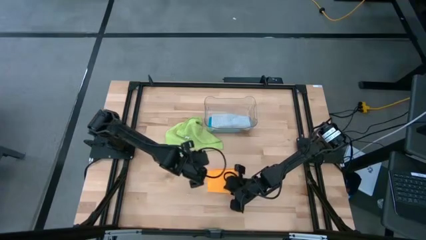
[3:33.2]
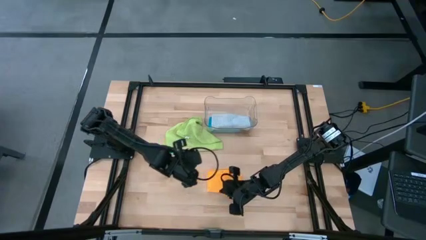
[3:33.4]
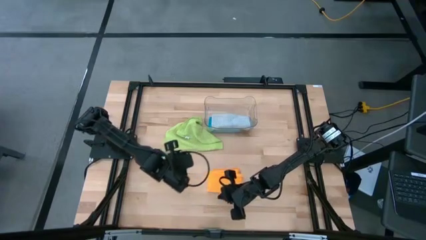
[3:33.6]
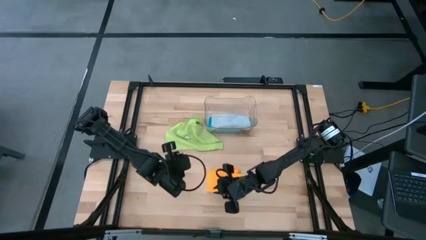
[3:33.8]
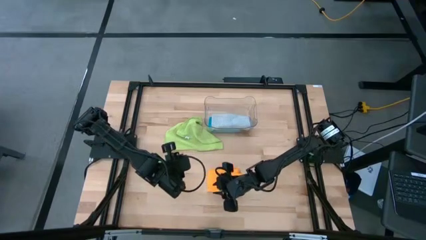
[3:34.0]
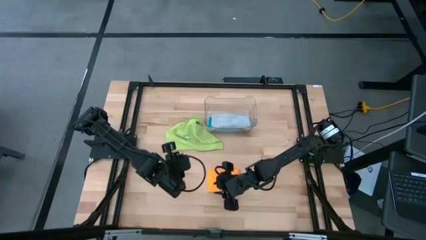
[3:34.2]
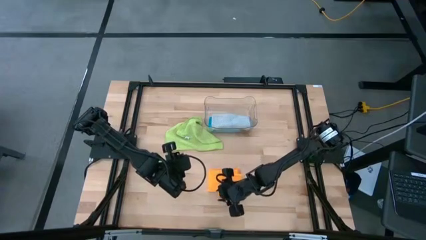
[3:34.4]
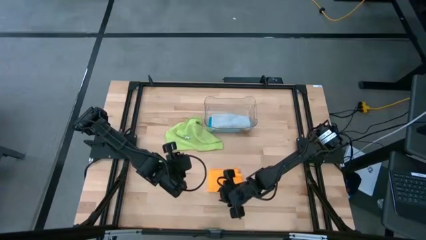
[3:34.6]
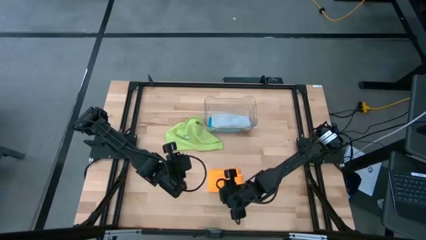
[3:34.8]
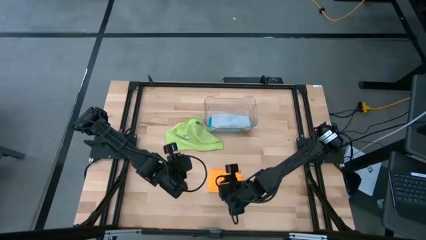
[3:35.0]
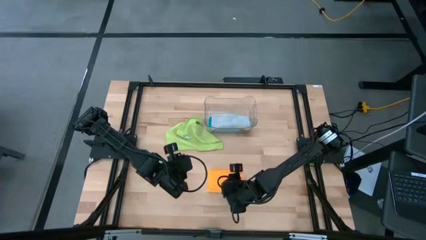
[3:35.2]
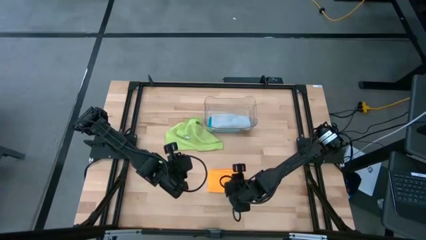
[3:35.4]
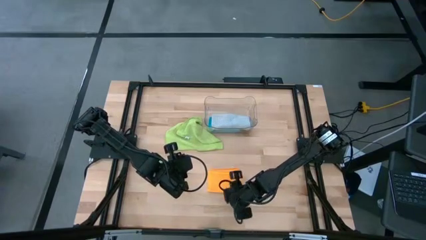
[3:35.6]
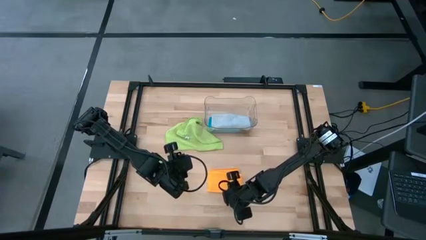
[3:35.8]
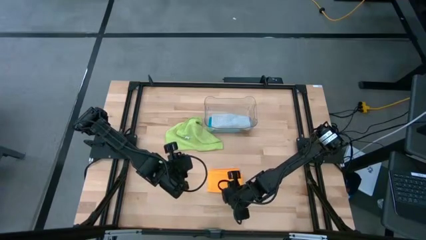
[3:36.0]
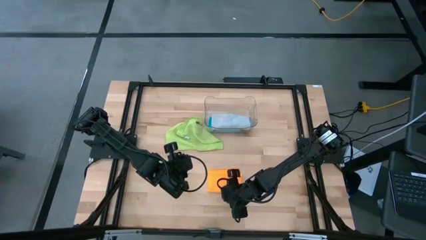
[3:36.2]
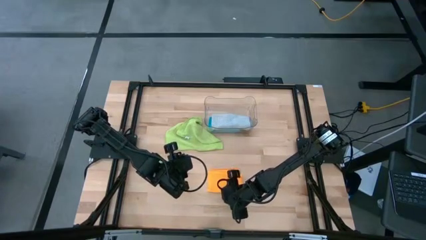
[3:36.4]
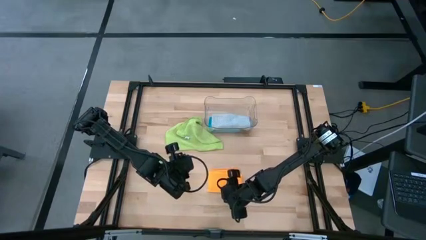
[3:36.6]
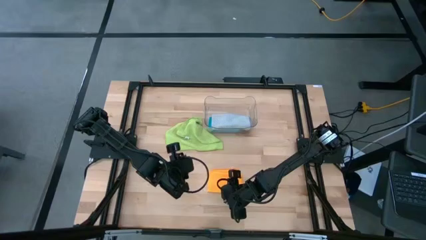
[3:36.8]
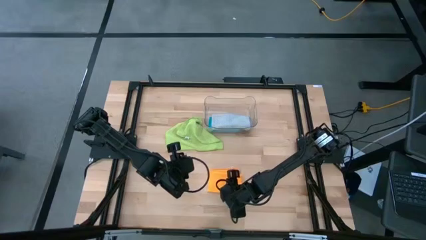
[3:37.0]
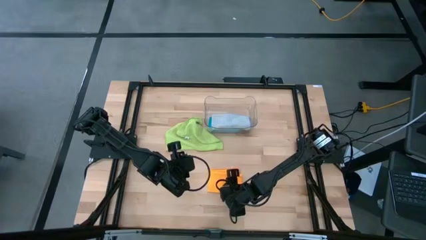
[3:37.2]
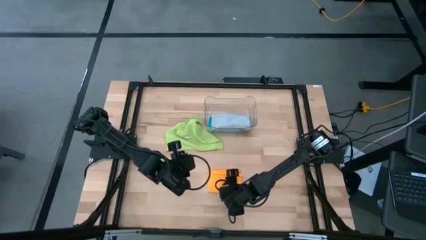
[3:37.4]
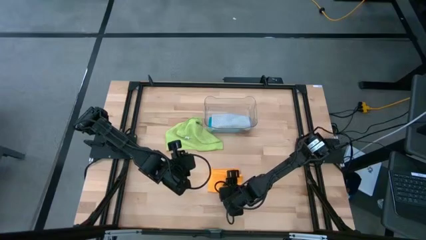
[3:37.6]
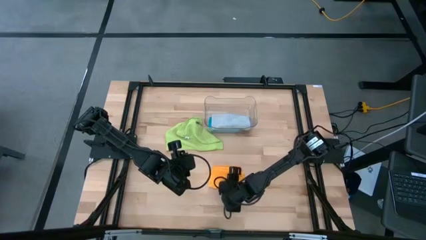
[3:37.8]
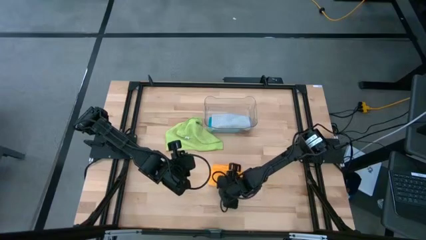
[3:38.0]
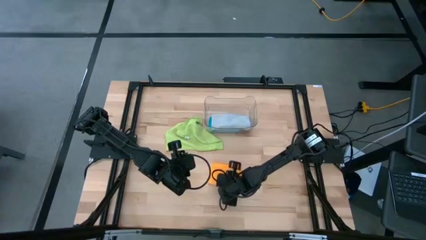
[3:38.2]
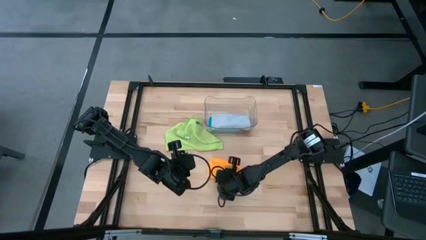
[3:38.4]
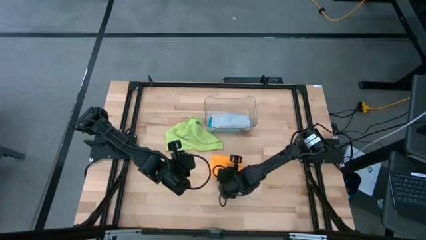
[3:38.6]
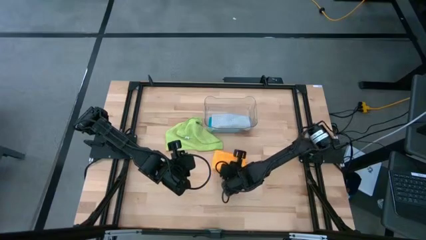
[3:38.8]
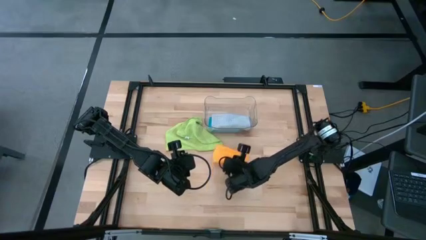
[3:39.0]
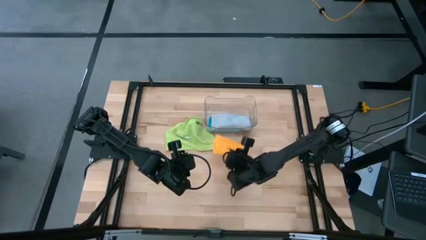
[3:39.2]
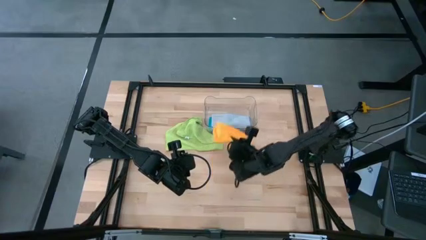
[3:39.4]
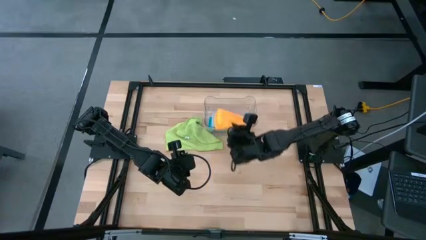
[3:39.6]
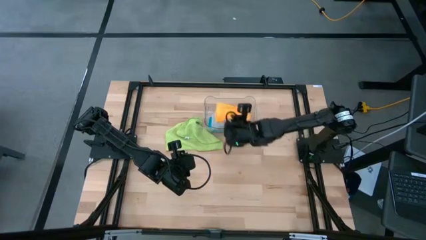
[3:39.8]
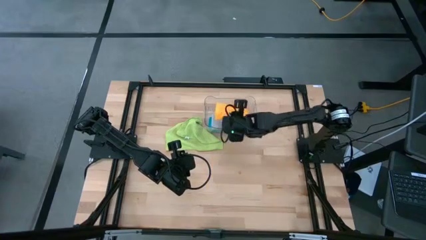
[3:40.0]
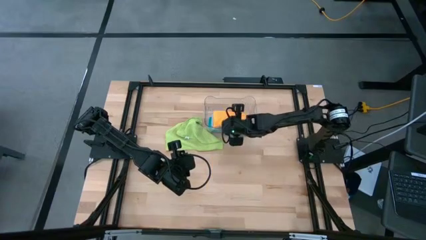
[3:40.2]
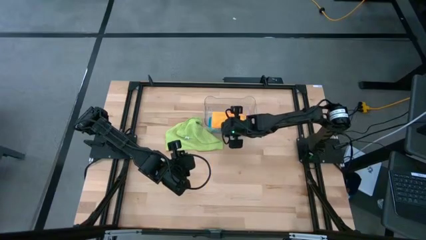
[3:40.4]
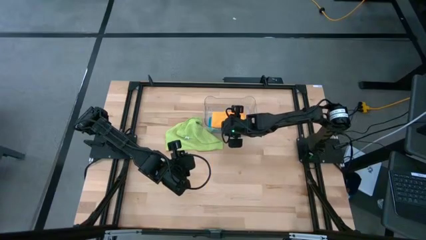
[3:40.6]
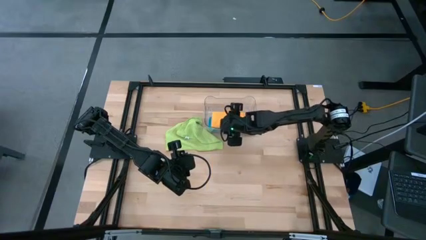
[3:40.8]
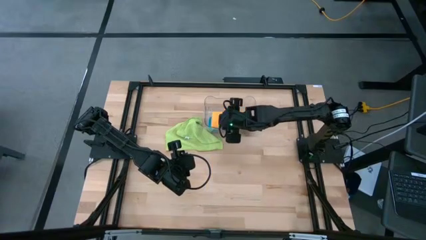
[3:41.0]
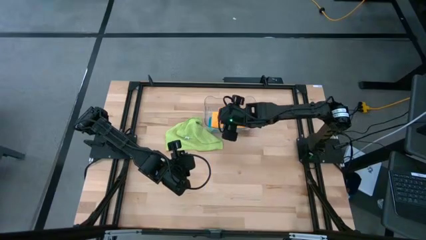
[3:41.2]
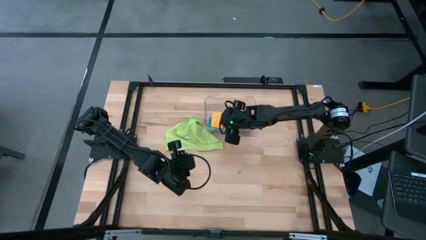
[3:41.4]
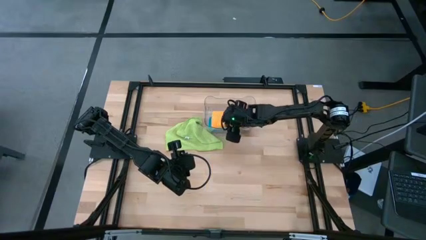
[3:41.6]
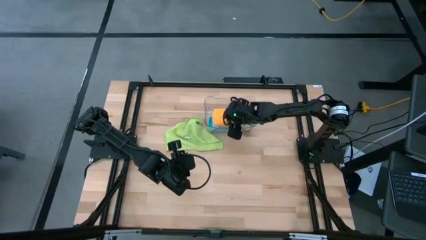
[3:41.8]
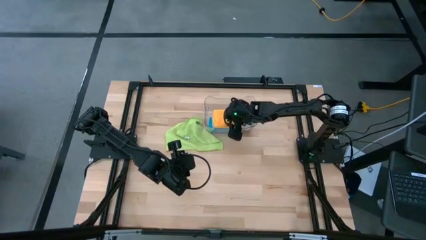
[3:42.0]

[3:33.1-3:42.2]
Task: Fold microfiber towels
Put the yellow towel into the transparent bin

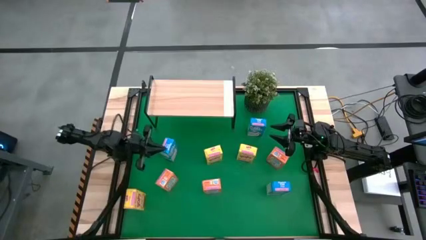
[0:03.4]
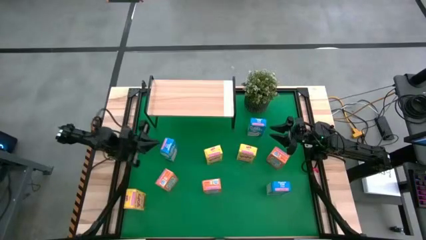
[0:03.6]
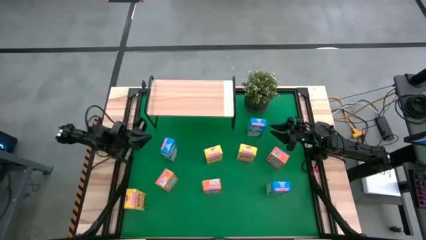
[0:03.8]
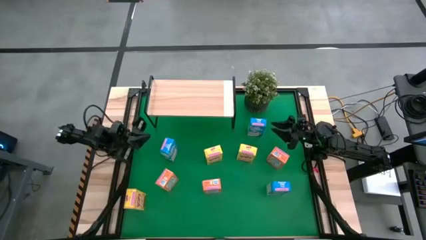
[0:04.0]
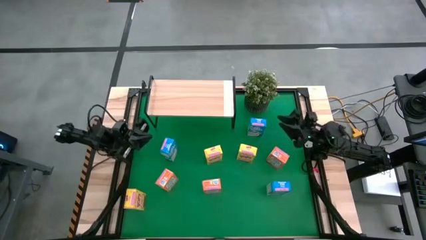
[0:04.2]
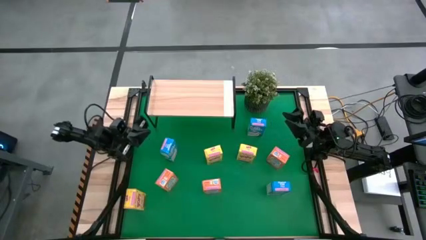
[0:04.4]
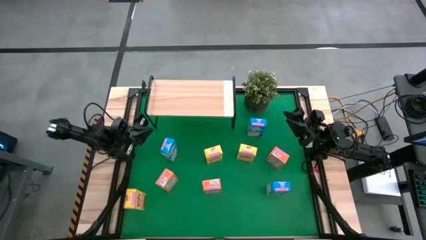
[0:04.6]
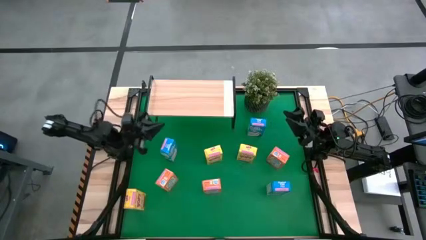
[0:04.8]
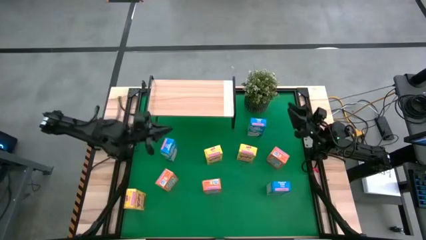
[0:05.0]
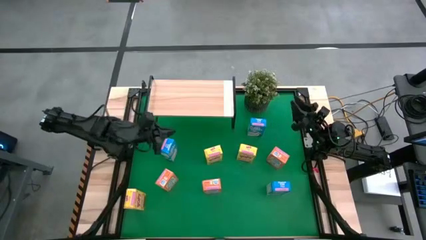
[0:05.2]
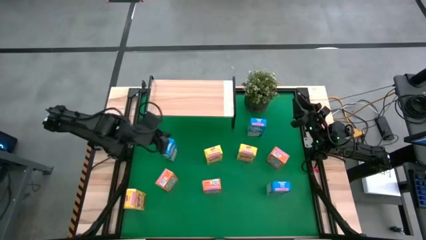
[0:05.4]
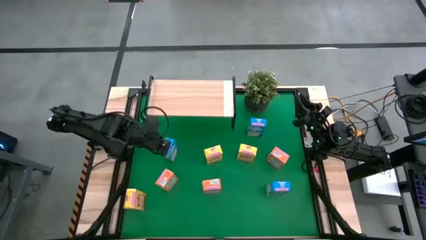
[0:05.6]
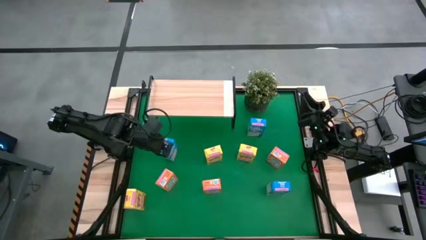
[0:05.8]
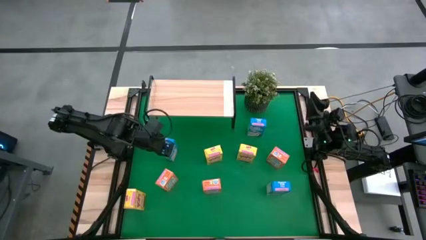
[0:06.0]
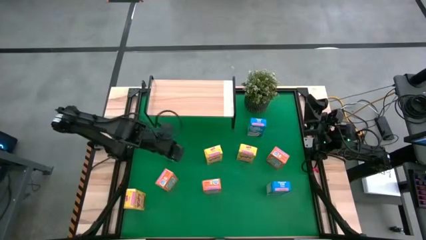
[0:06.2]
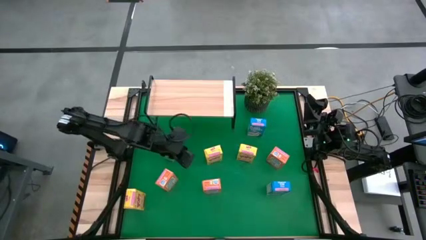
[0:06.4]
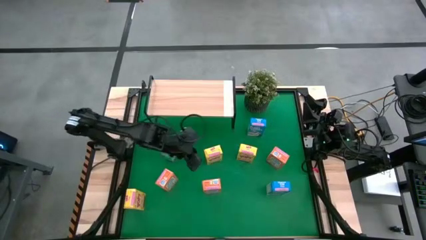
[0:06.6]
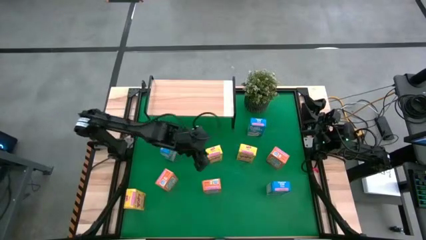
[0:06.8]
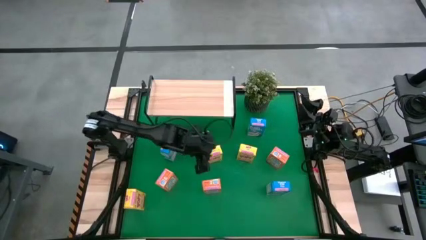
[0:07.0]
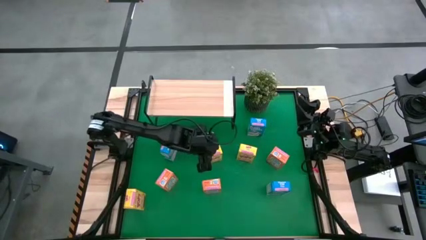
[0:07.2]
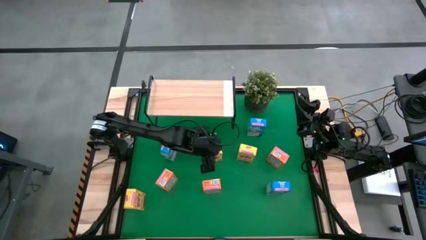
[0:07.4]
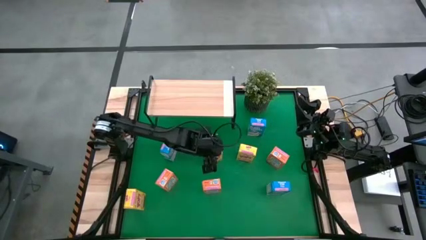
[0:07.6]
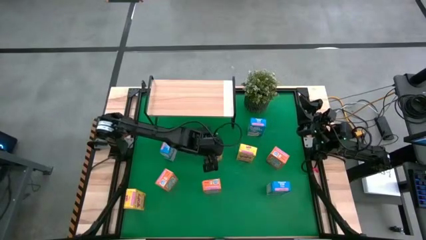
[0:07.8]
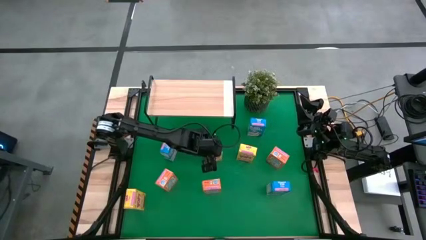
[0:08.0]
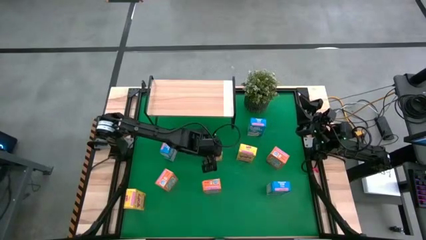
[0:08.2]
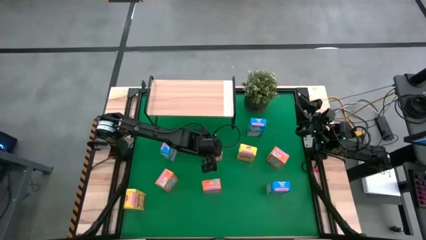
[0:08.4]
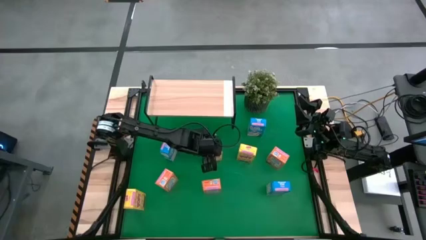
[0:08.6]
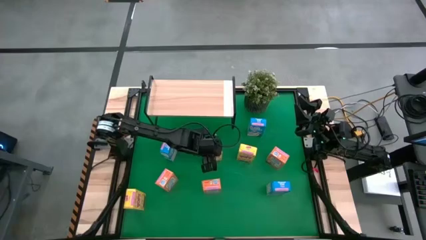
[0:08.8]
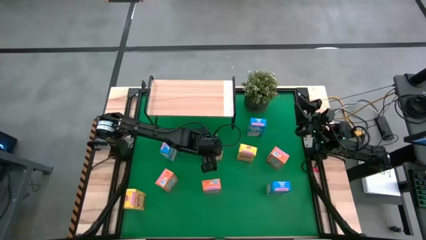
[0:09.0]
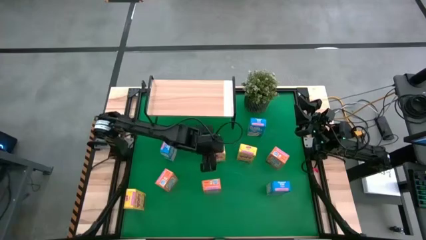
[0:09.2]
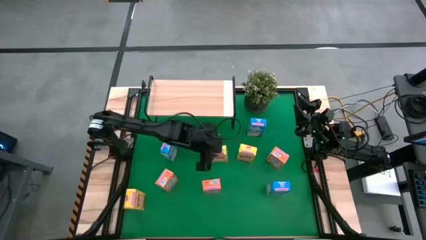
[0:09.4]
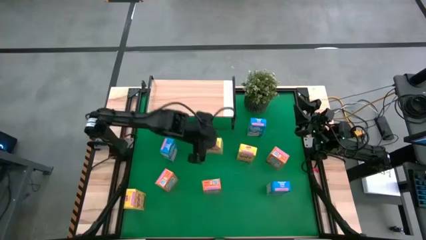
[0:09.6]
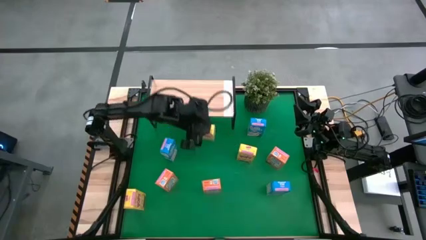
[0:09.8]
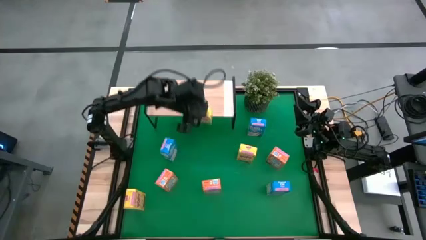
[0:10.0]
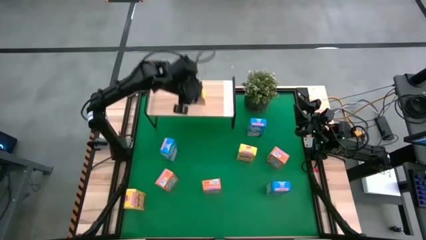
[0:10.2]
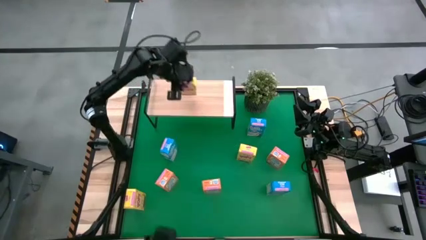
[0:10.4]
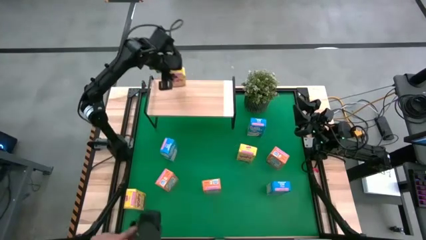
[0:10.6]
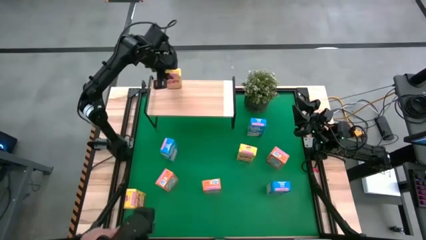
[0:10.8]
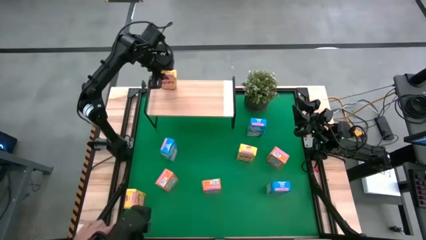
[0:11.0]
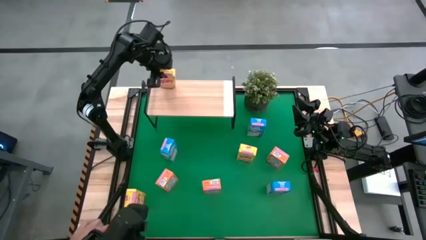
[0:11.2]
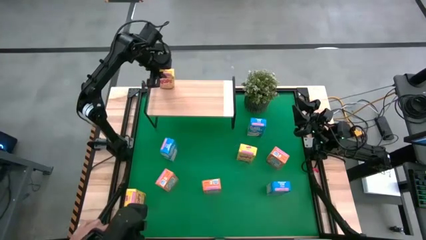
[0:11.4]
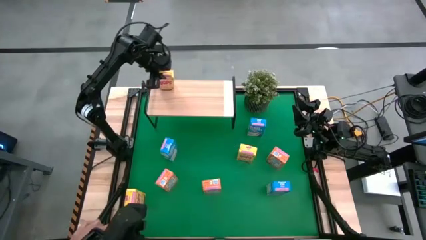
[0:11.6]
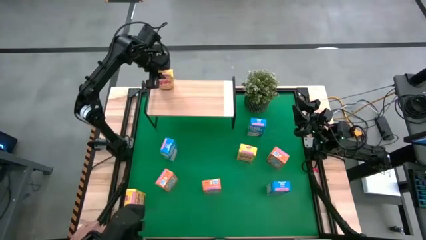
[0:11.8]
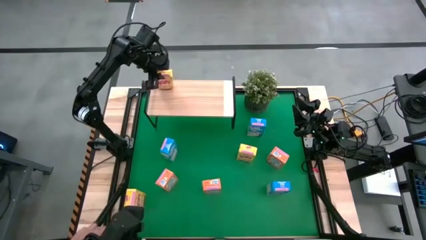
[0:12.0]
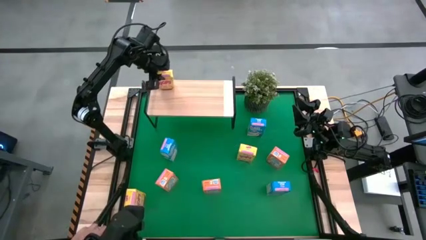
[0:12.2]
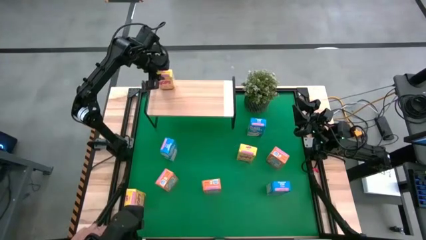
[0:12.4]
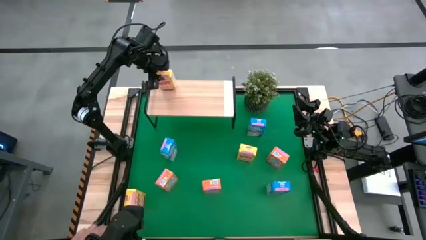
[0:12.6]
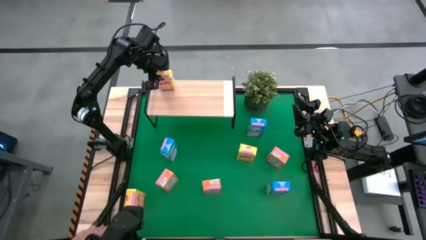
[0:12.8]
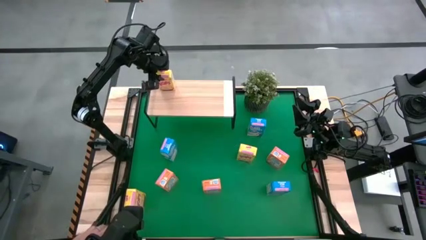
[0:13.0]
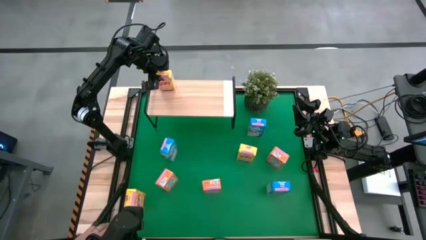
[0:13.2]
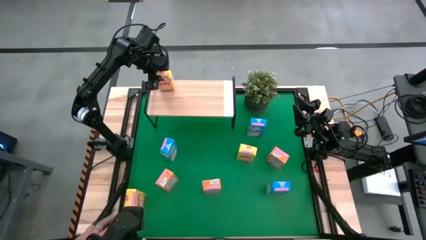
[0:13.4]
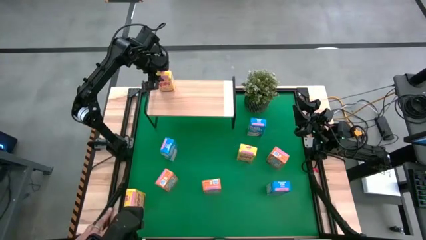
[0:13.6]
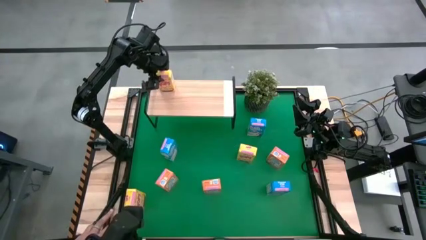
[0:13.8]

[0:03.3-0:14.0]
Task: Stack cereal on shelf
Put the middle top yellow cereal box on the shelf
